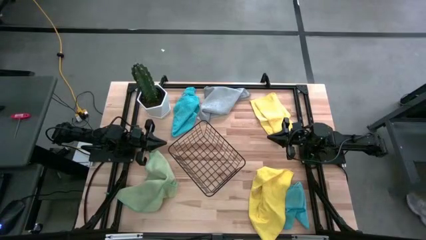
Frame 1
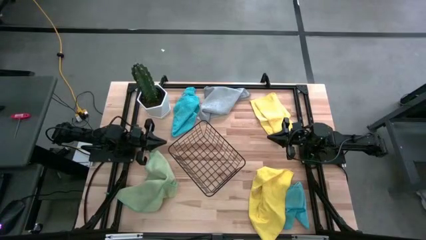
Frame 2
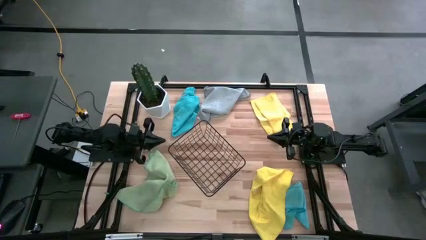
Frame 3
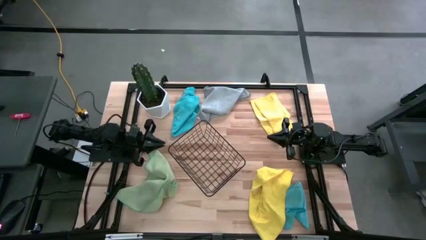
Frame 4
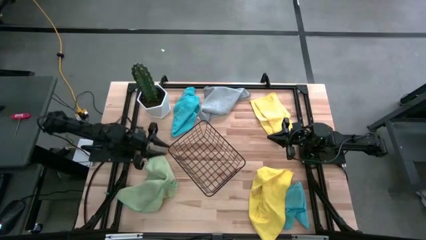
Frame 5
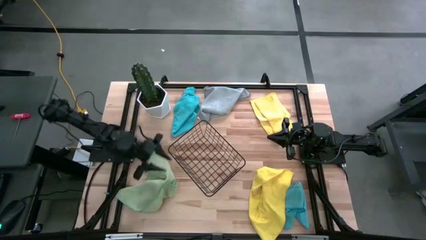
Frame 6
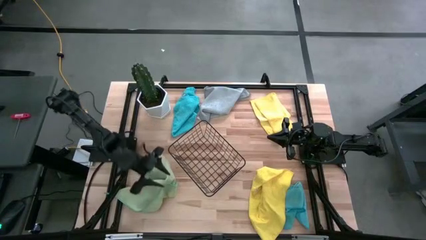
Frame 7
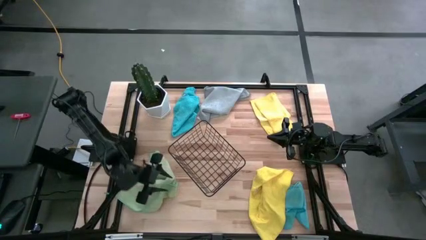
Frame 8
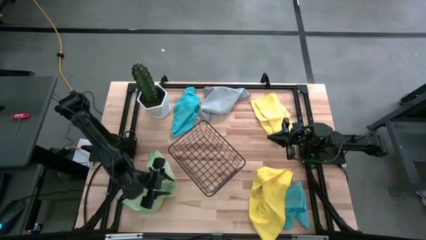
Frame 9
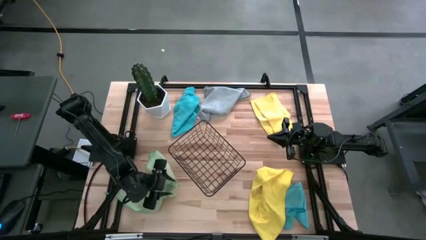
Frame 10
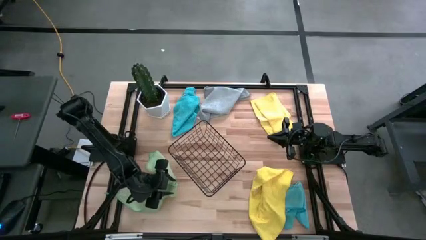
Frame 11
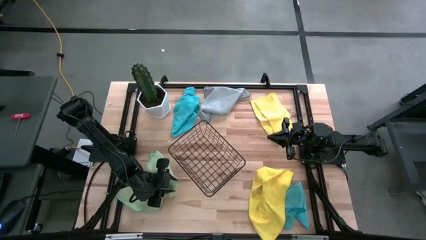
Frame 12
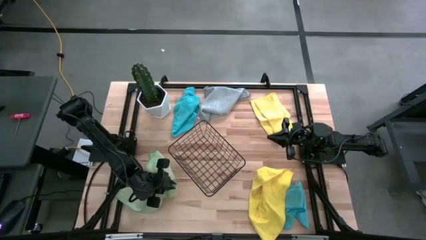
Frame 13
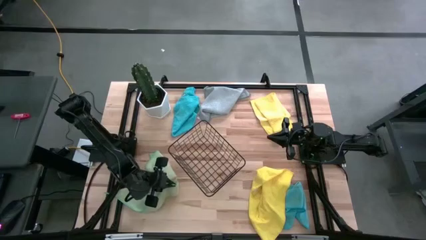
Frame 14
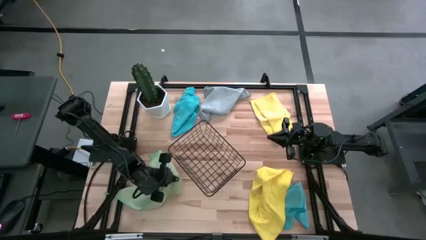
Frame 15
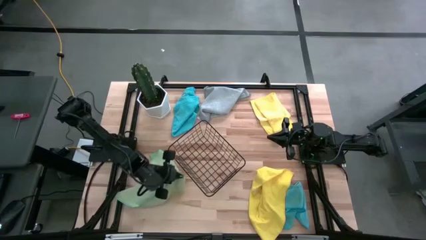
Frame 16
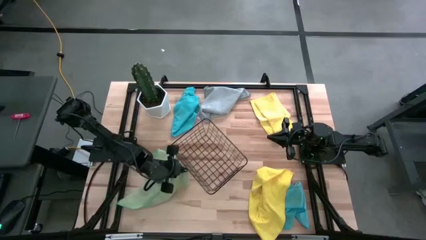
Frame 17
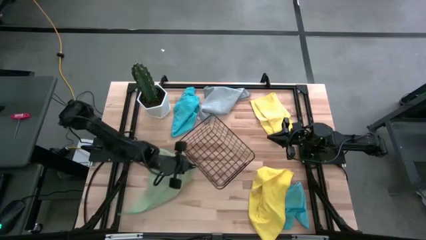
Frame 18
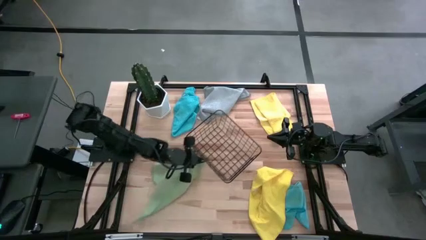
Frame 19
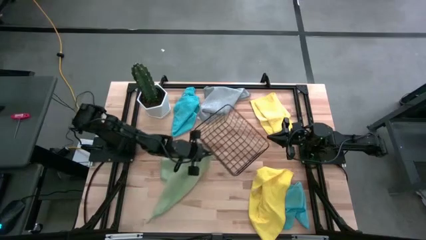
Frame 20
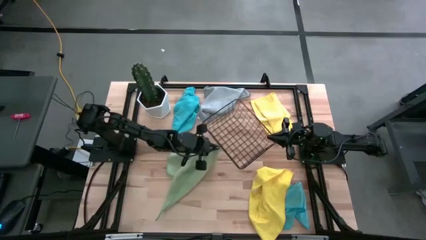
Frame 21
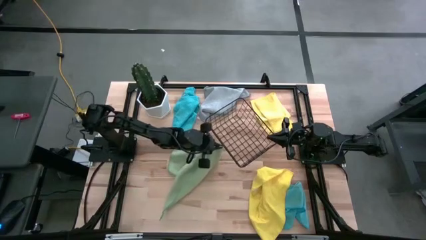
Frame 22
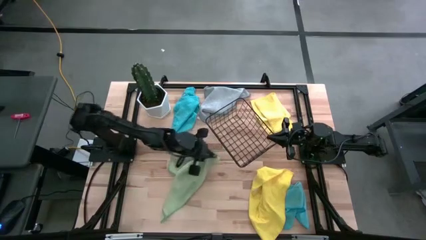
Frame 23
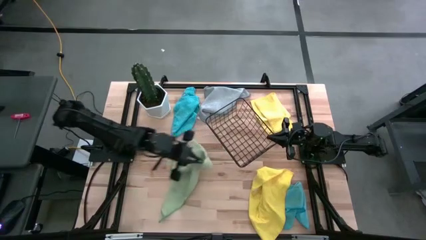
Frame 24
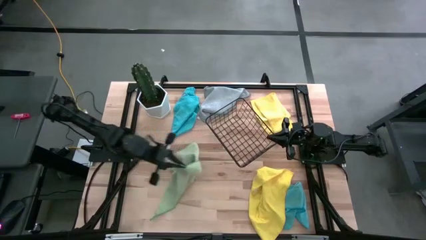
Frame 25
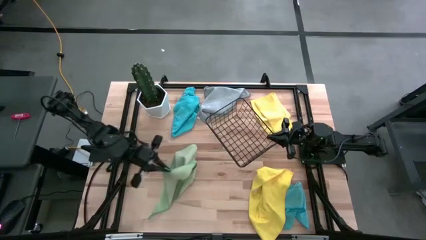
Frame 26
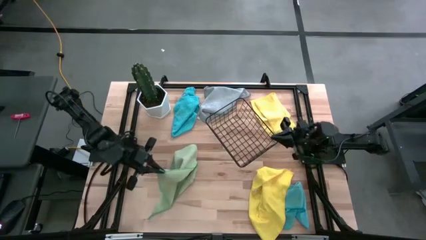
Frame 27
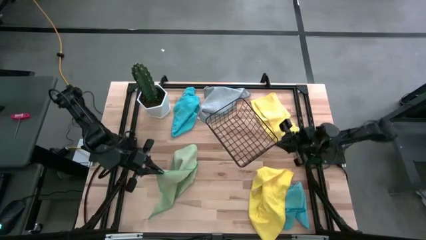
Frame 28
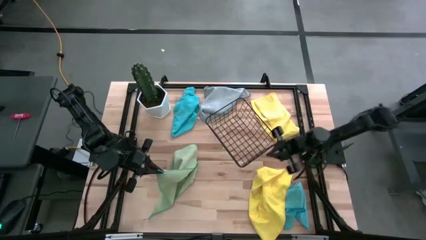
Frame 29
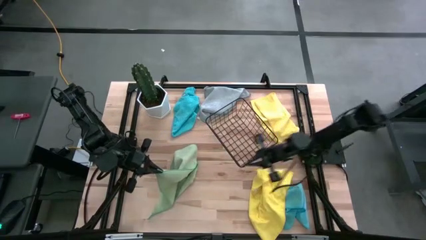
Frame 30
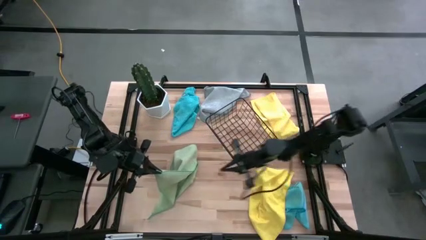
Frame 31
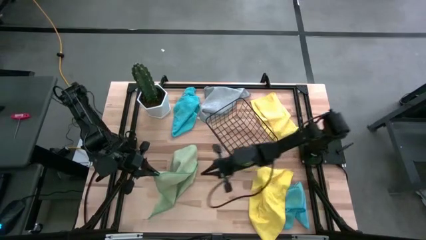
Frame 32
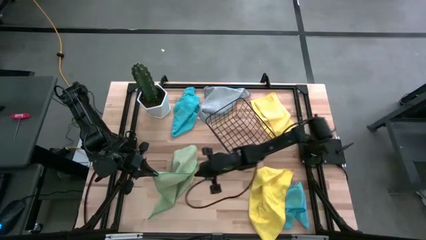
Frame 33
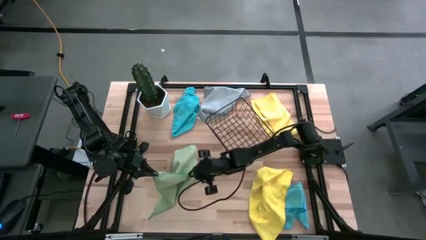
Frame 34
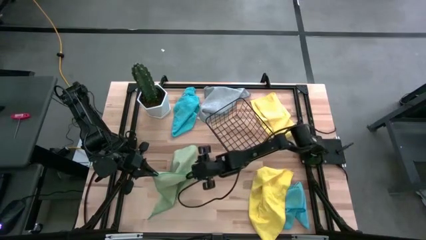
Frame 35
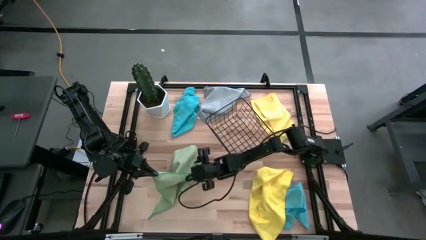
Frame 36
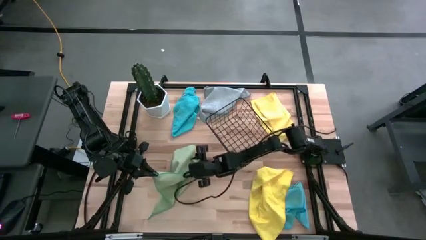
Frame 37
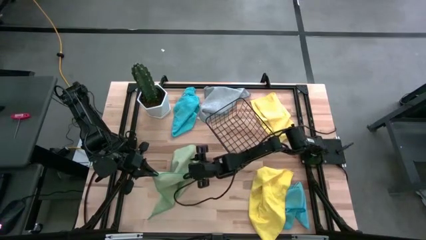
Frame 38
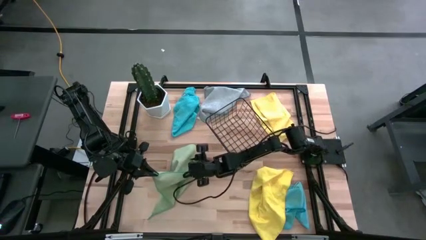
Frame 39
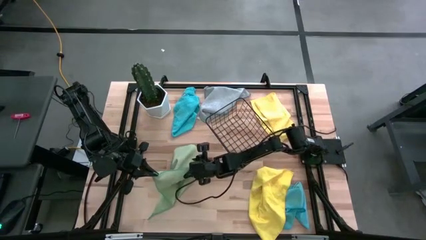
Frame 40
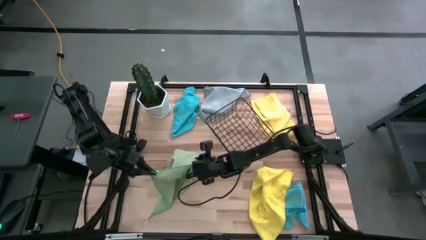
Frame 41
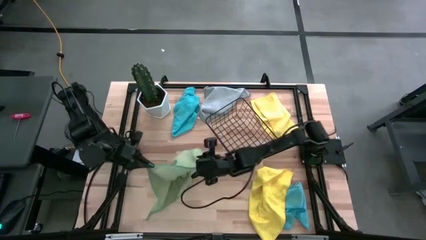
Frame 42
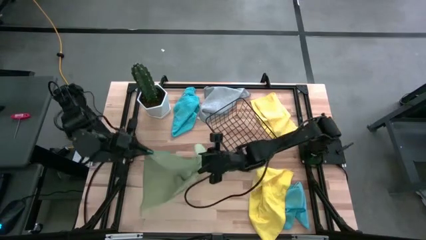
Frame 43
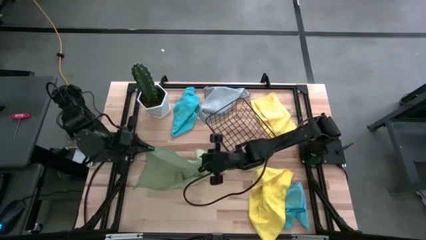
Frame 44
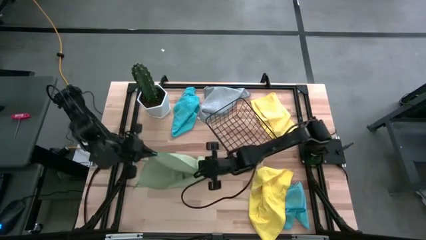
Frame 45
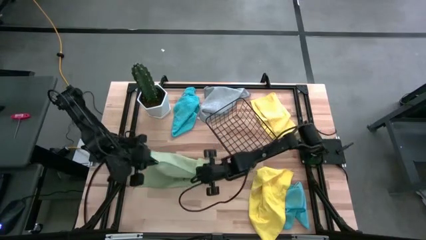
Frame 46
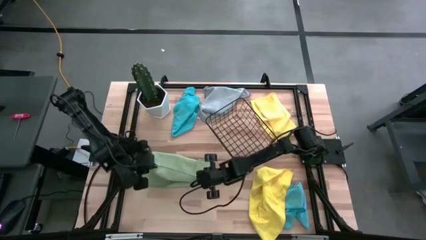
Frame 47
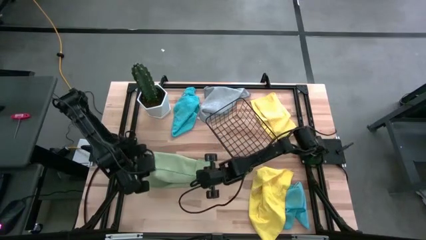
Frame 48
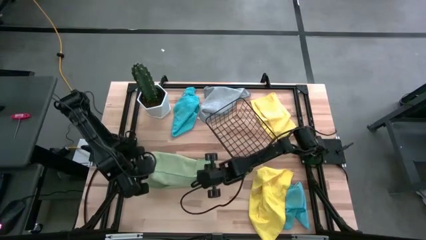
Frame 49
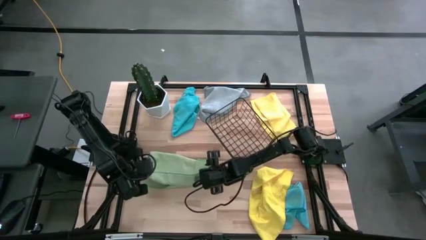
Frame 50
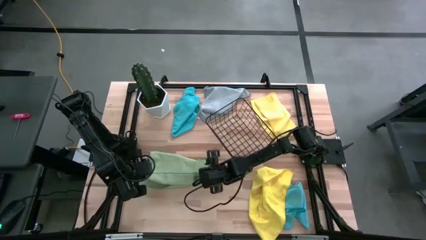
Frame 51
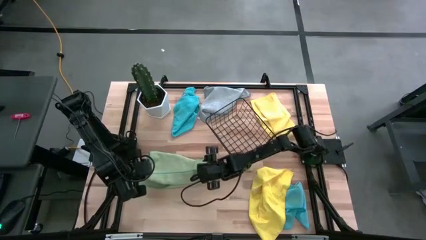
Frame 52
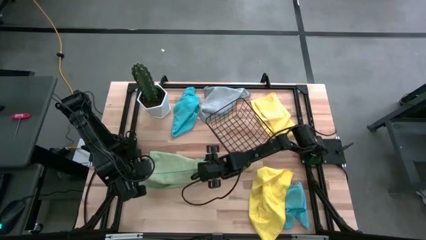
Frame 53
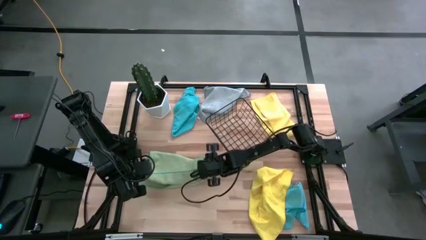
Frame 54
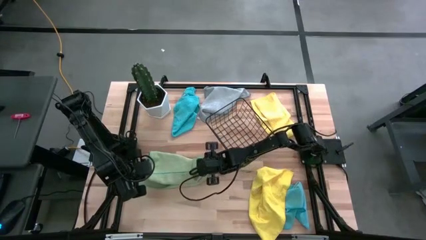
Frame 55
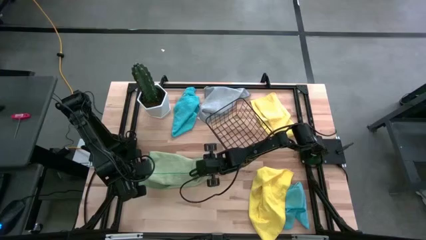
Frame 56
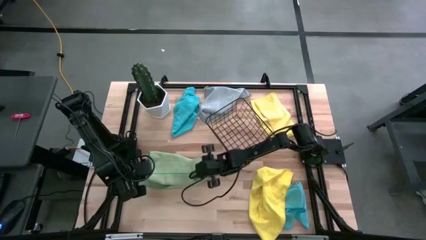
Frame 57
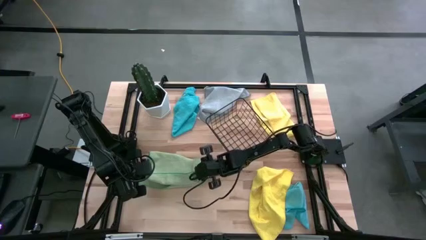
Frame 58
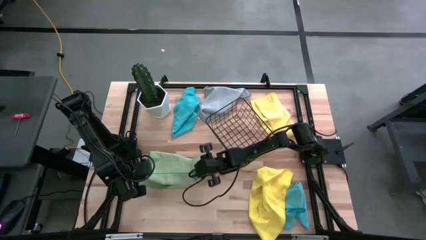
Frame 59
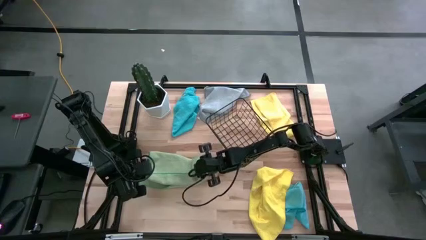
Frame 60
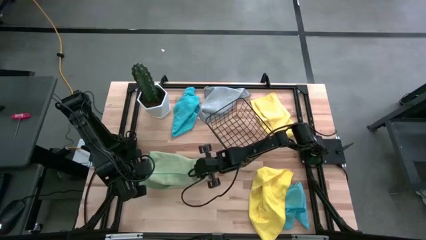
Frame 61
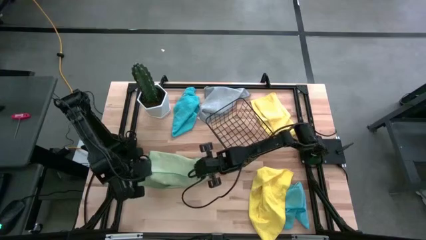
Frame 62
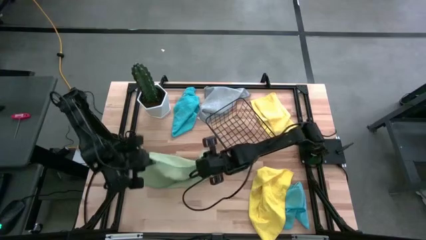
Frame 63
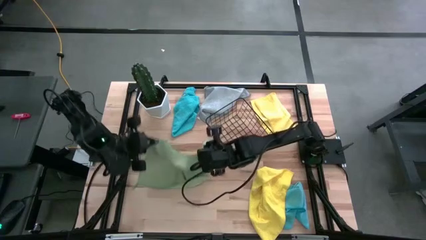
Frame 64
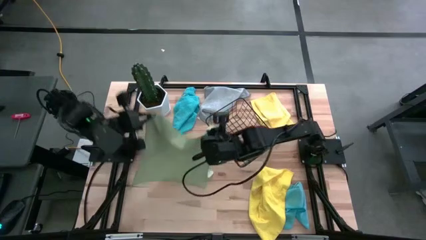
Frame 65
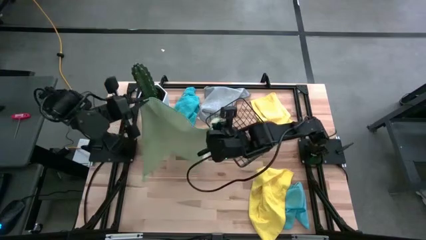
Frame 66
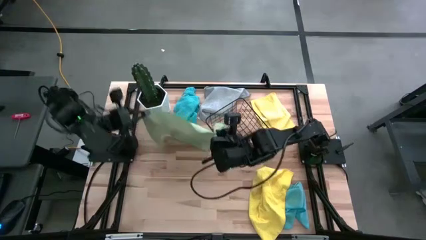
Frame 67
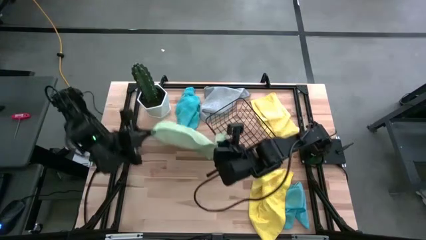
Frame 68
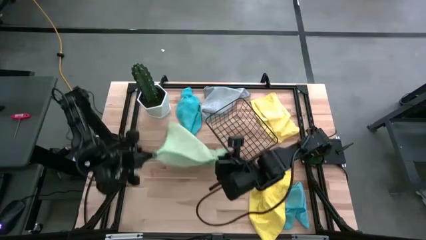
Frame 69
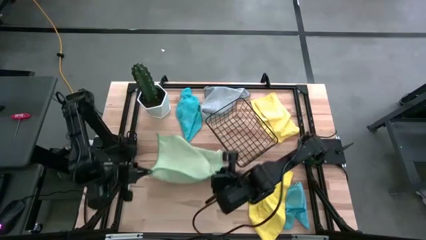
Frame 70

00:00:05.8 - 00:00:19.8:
Task: Fold microfiber towels
Fold the green microfiber towel
